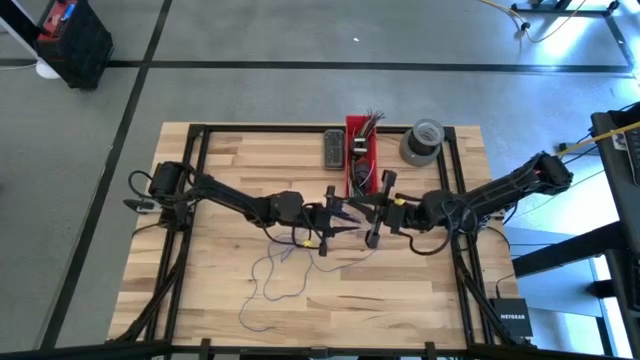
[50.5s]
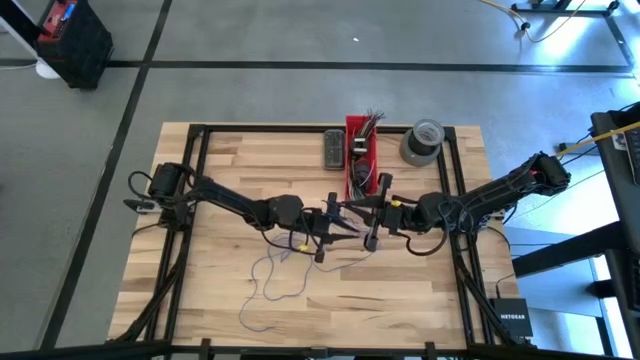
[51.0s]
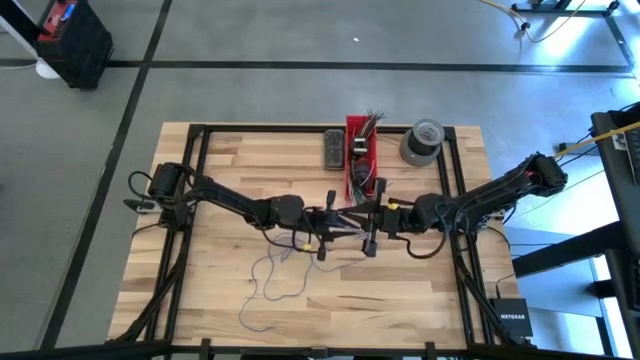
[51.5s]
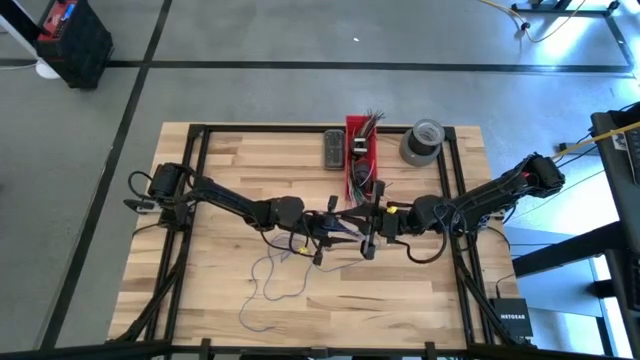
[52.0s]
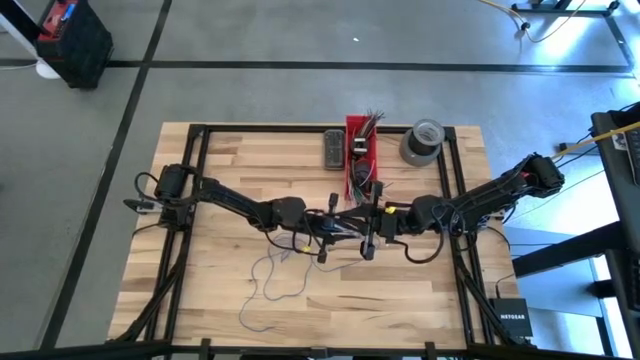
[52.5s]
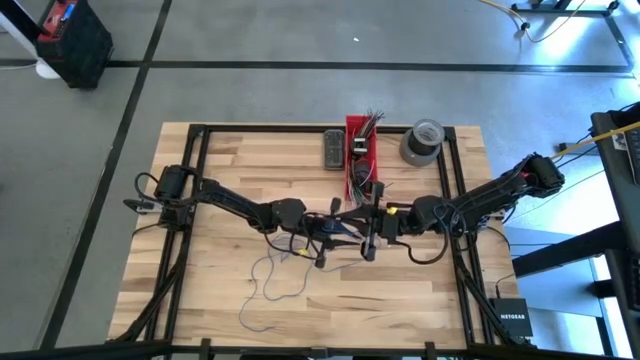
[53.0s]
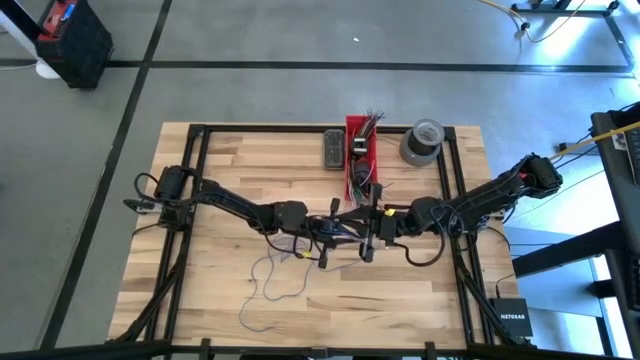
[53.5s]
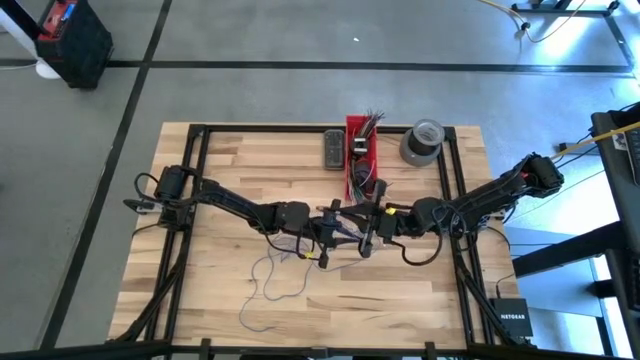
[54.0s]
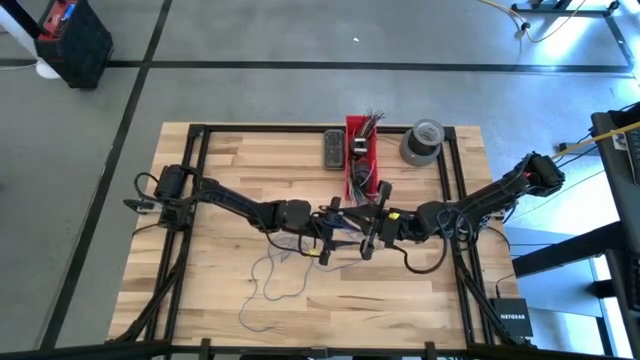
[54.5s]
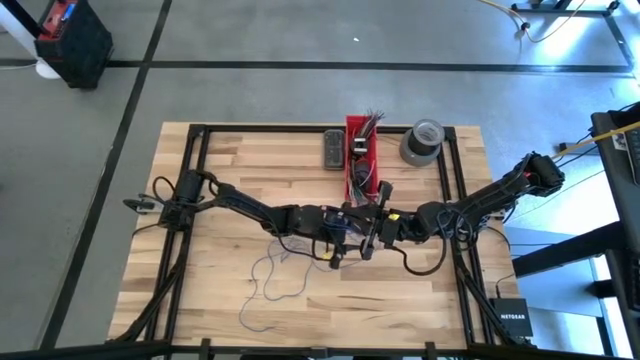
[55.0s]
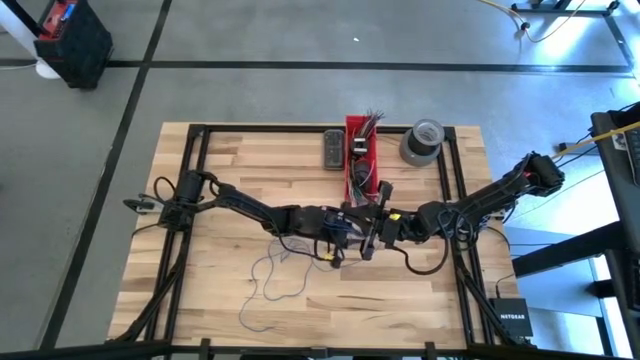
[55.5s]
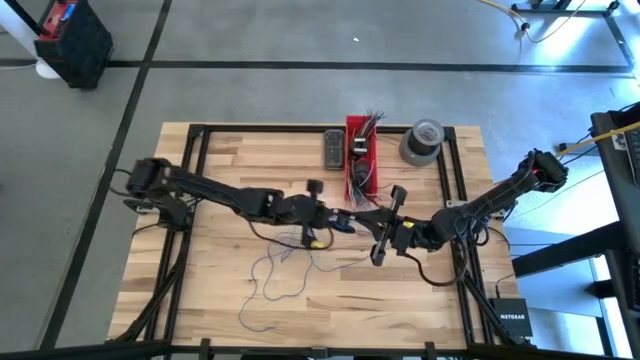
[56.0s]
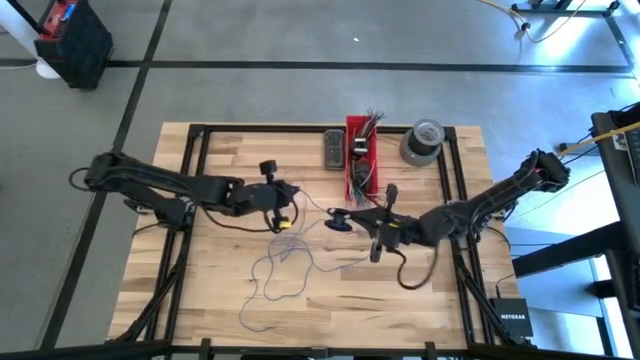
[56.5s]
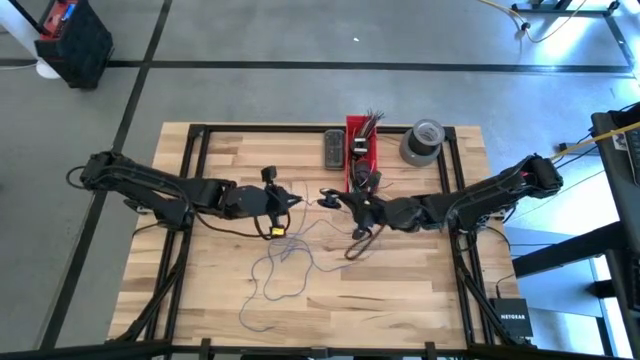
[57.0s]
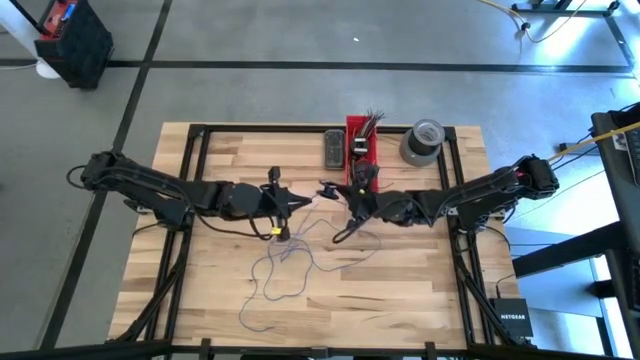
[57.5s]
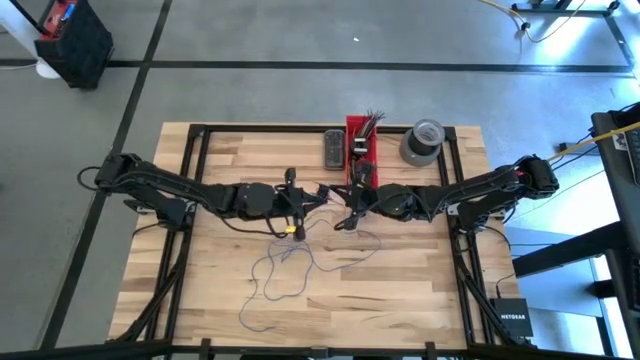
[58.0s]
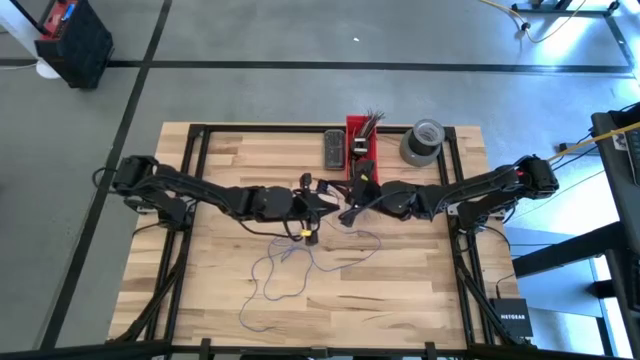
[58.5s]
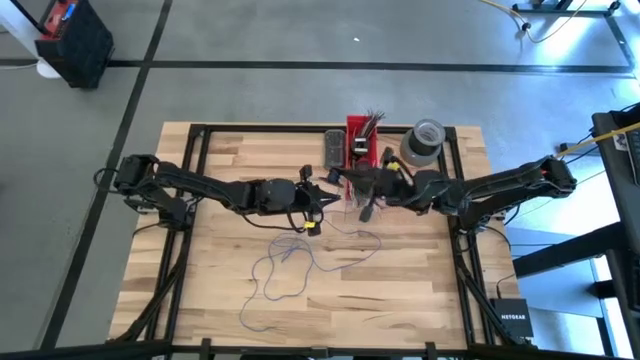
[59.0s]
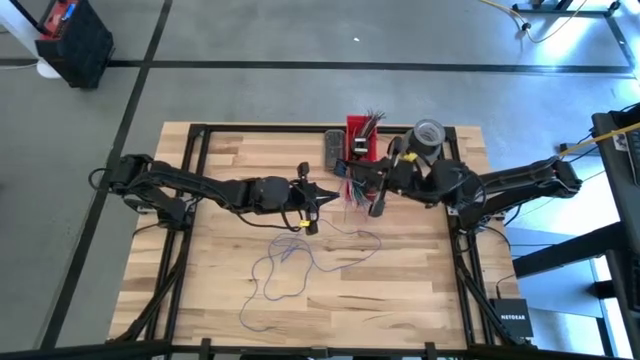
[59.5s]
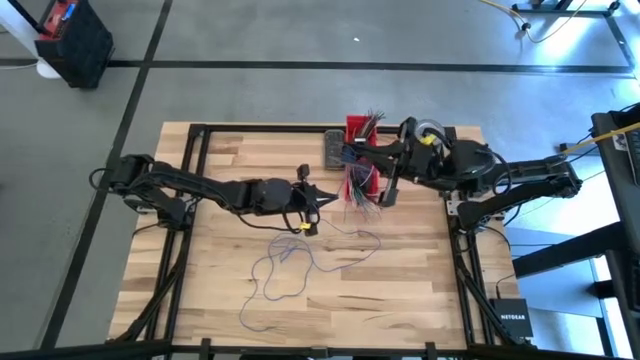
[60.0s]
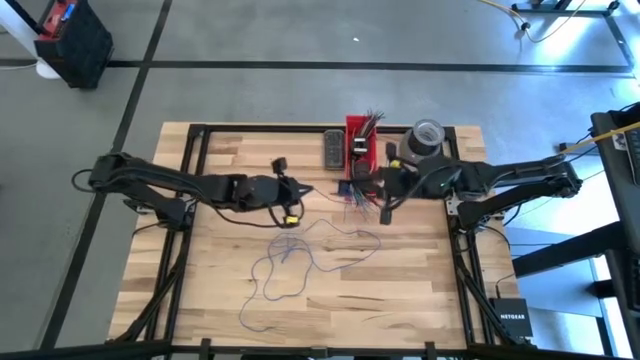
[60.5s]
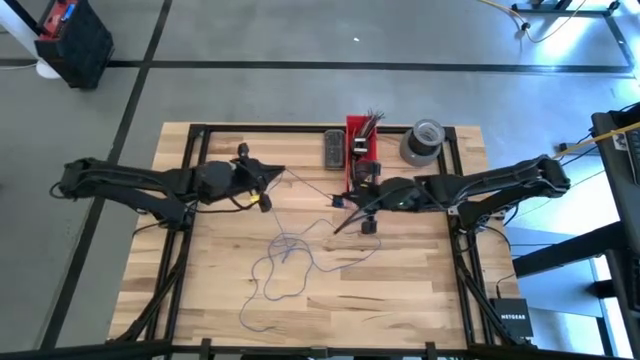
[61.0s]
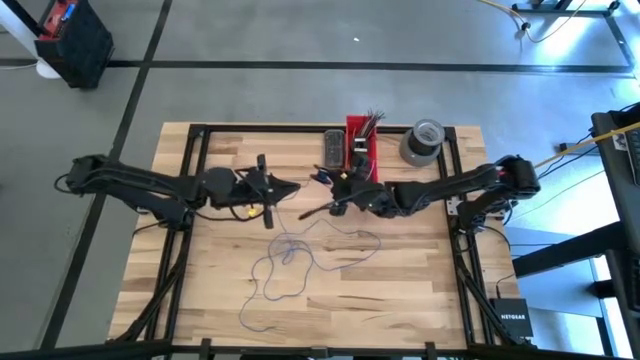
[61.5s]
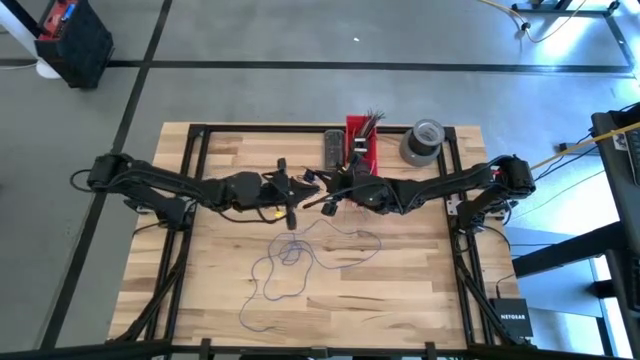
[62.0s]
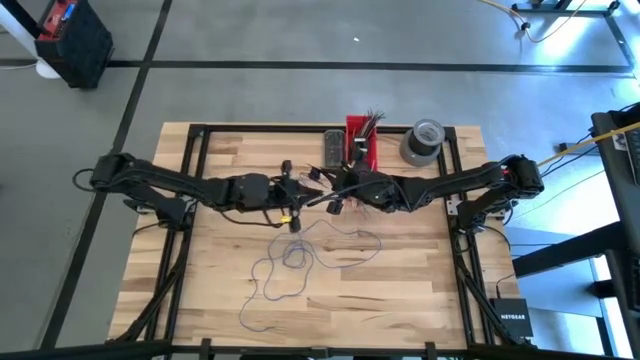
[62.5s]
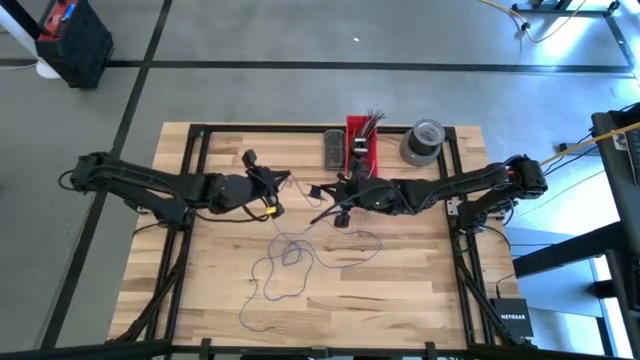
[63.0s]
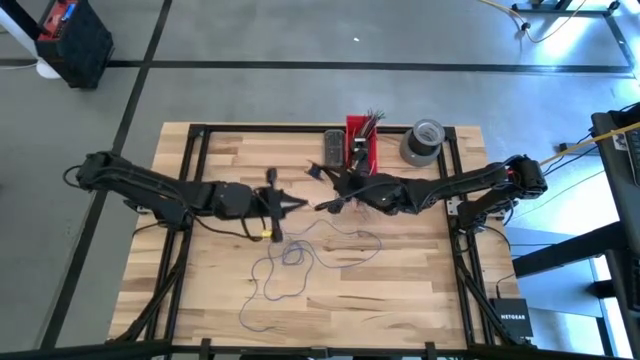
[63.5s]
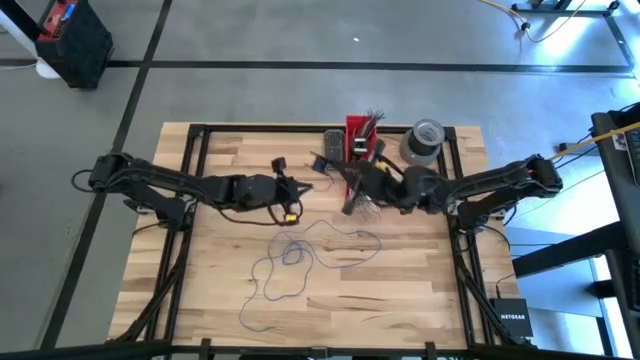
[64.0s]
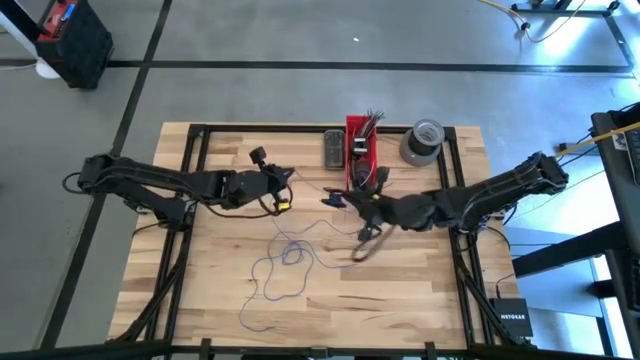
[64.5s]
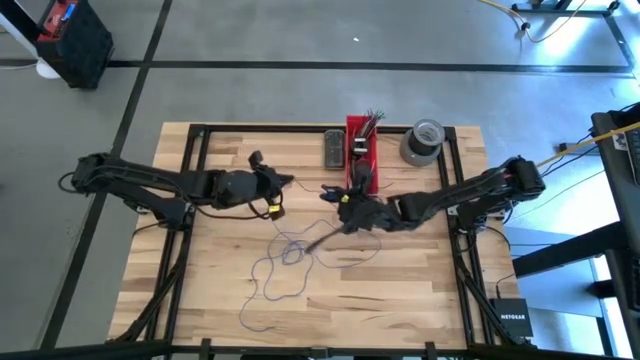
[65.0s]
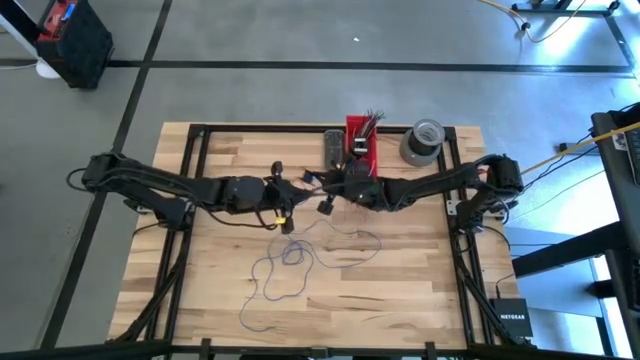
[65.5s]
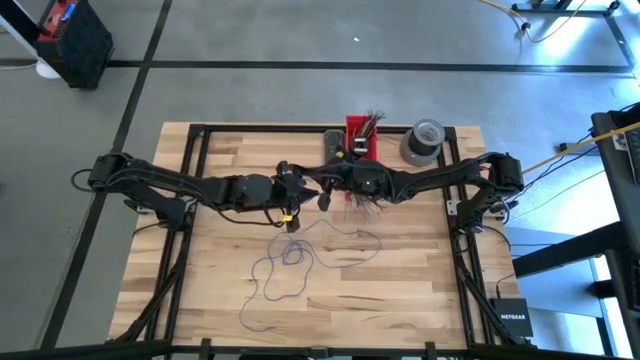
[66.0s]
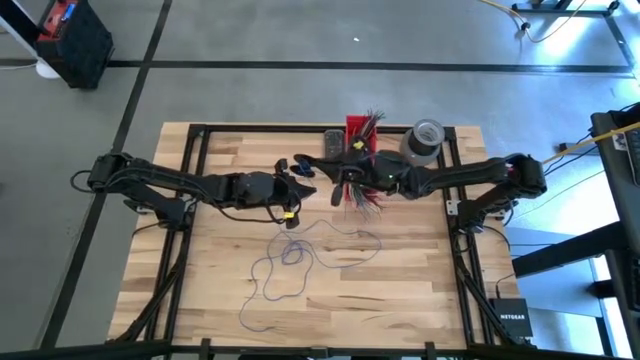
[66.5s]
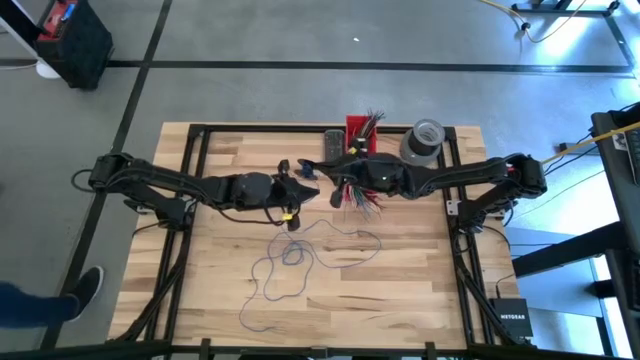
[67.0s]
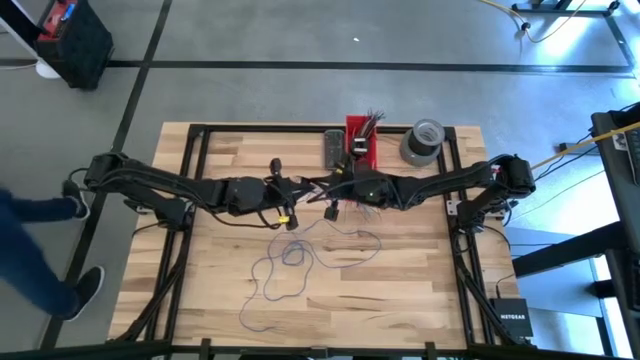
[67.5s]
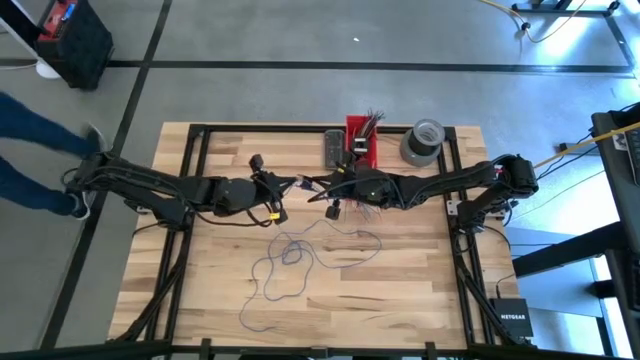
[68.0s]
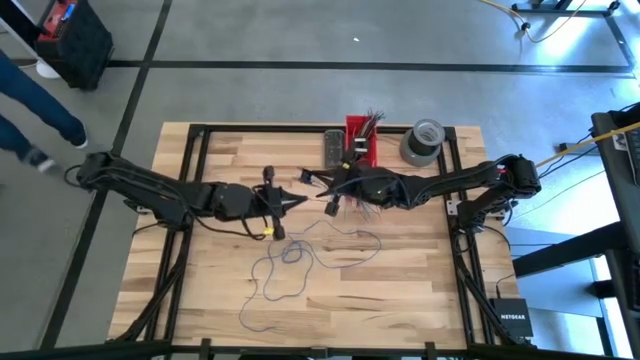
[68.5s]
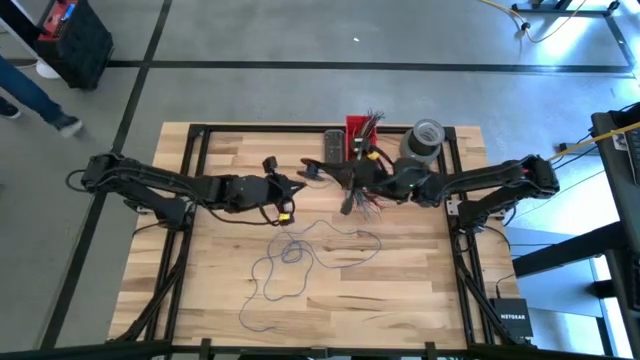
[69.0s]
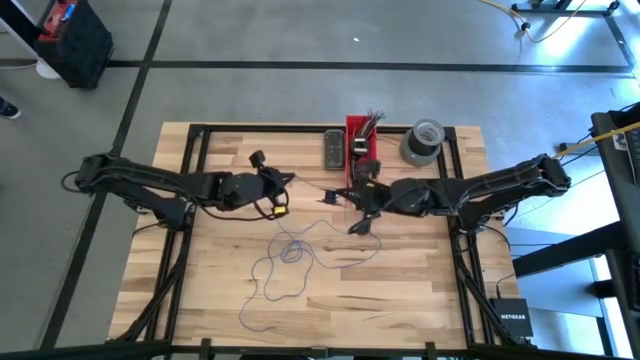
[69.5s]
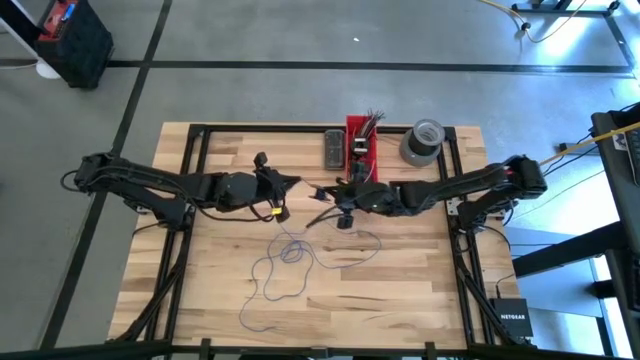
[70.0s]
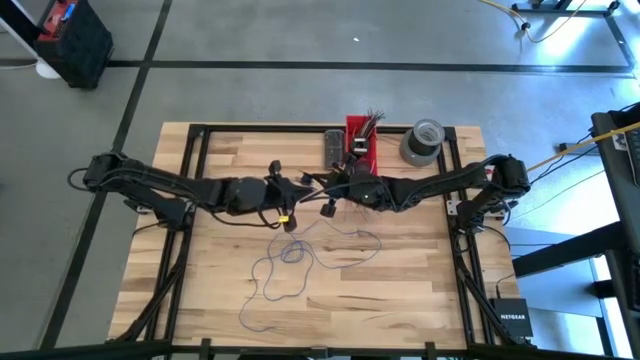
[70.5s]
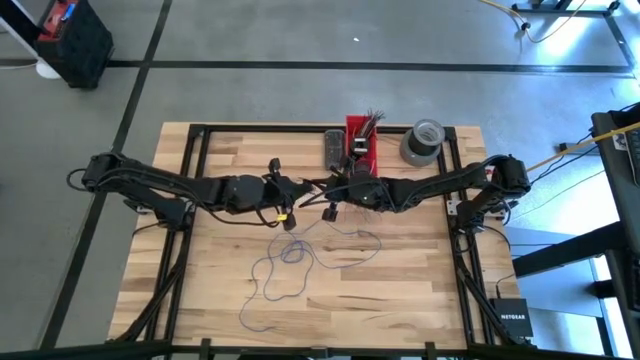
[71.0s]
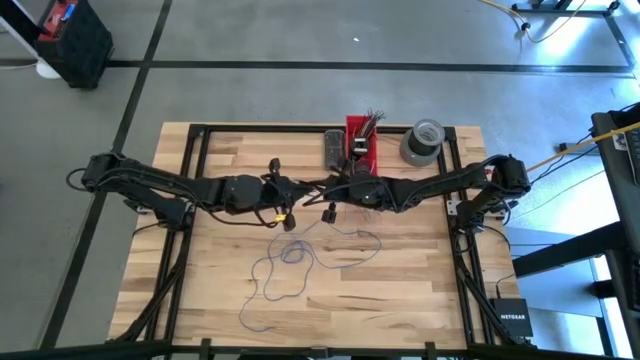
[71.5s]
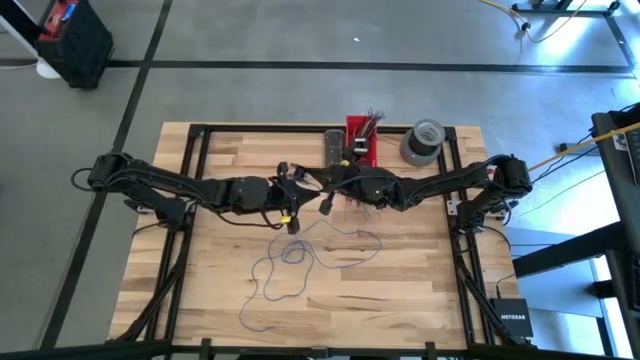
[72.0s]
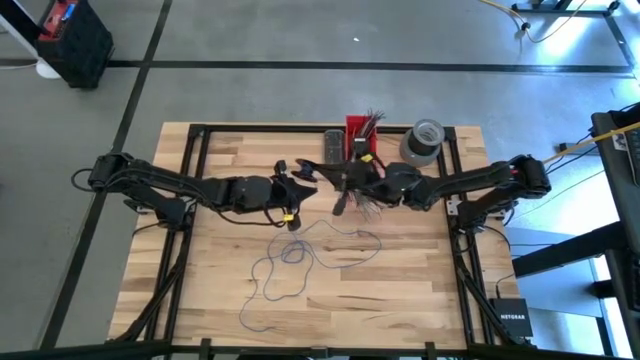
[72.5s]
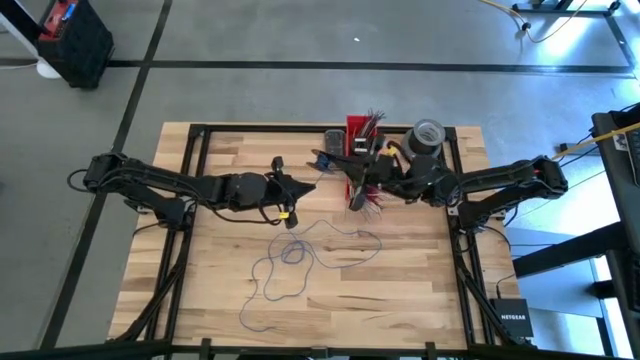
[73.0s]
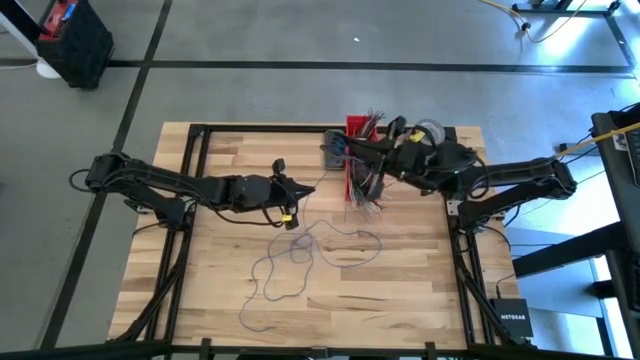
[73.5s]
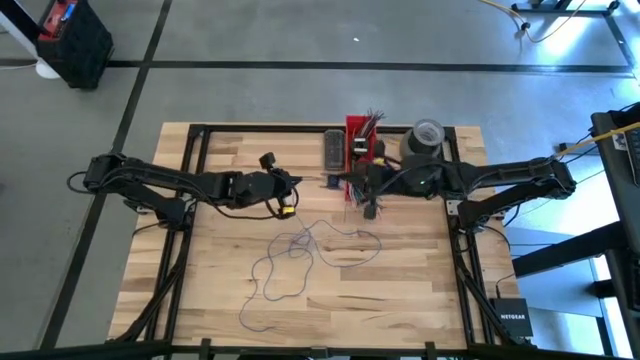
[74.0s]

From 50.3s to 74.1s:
Task: Coil cords
Coil the blue wire into the black spool
